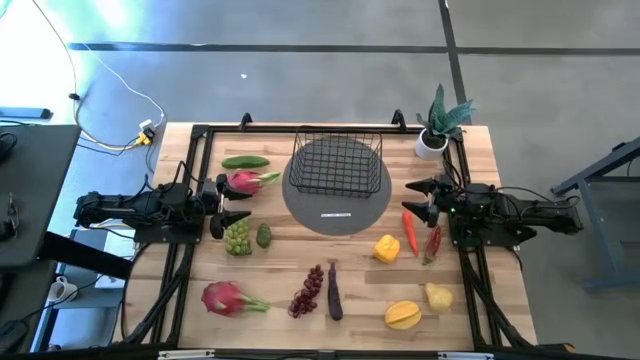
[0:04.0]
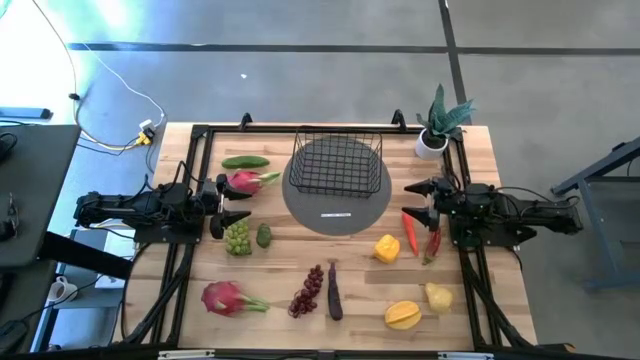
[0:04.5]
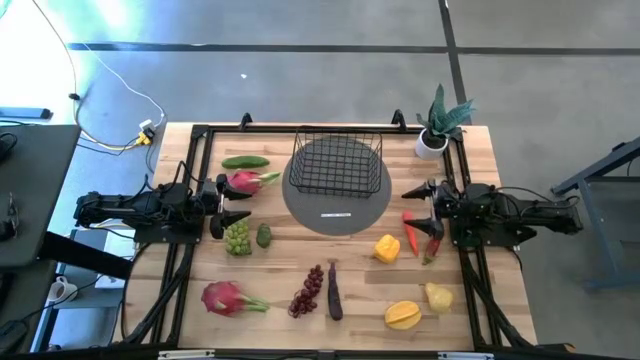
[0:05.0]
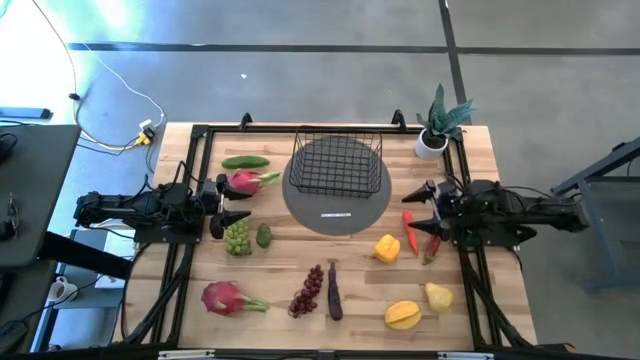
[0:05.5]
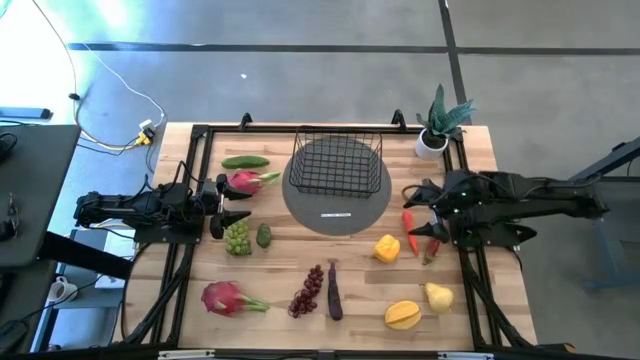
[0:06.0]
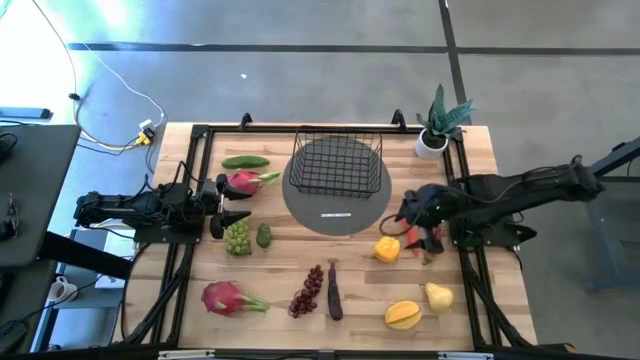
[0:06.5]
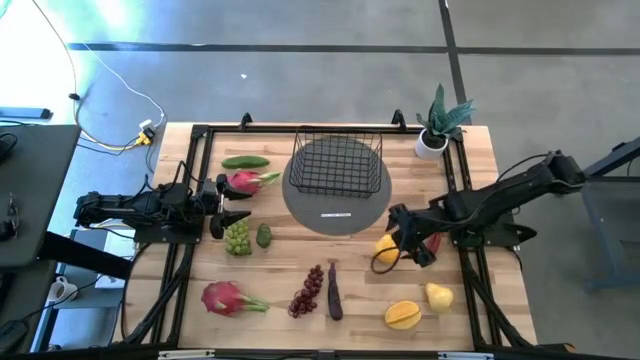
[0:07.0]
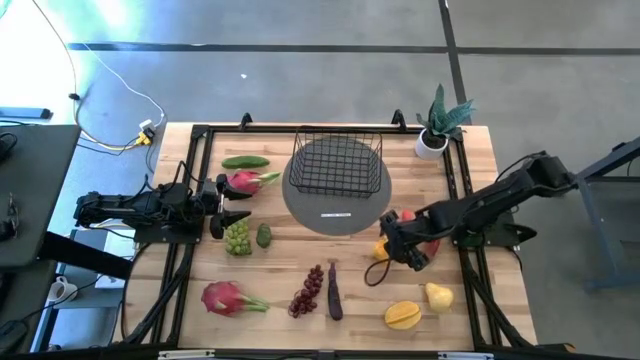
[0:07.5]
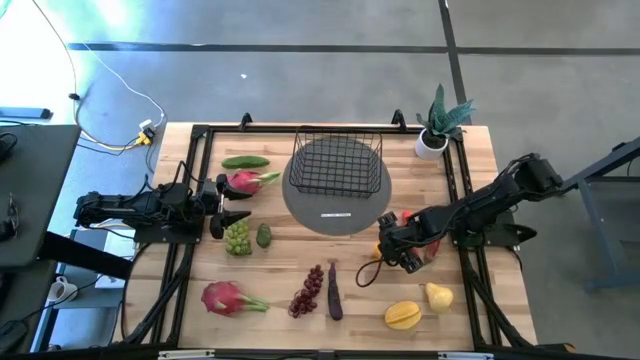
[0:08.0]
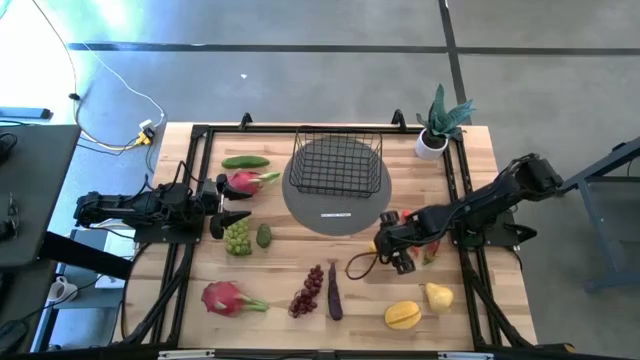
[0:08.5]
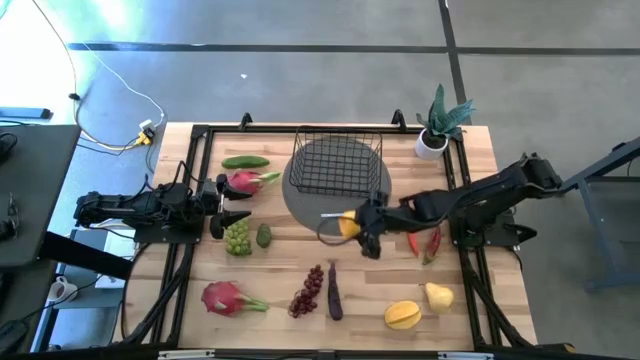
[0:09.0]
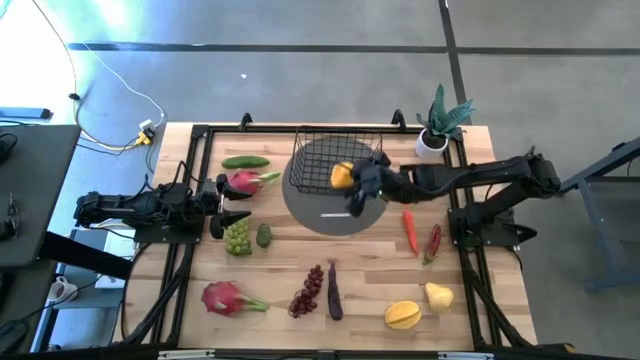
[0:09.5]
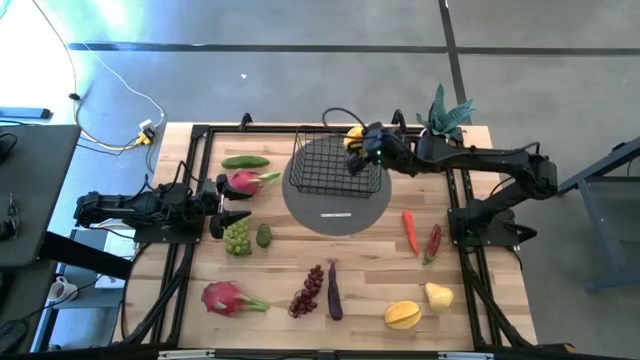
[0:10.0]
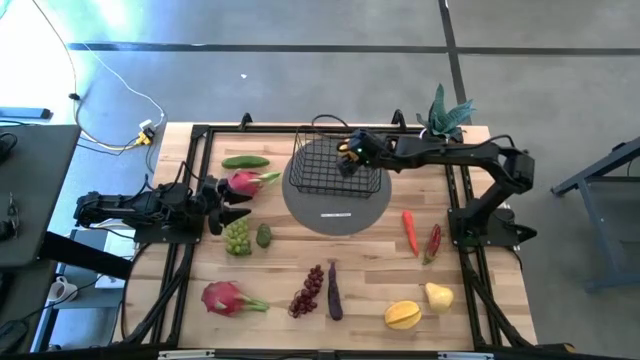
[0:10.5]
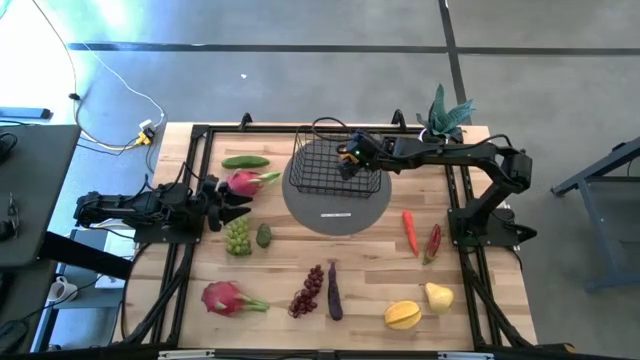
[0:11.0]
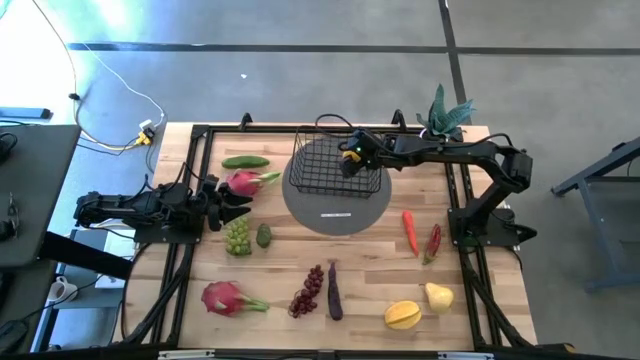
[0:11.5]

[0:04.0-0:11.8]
Task: Build produce basket
Put the bell pepper into the wire basket

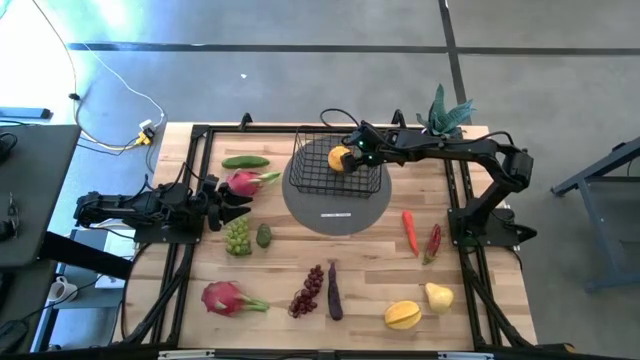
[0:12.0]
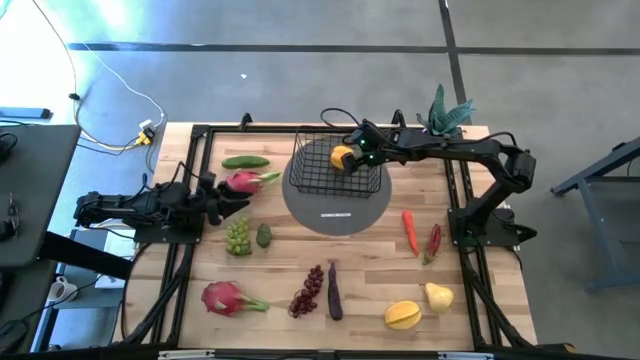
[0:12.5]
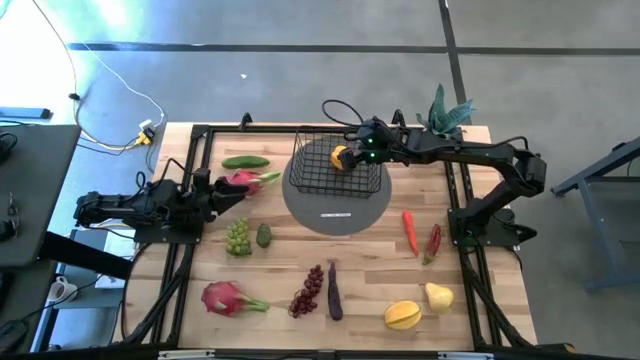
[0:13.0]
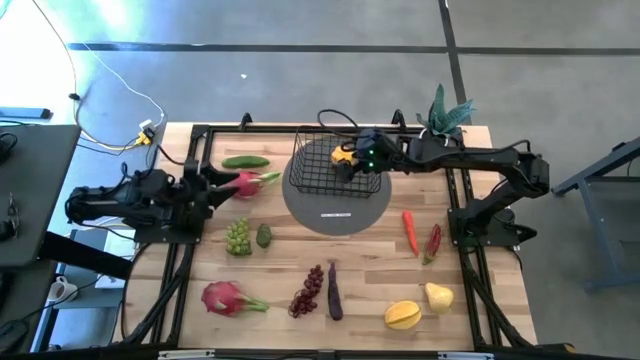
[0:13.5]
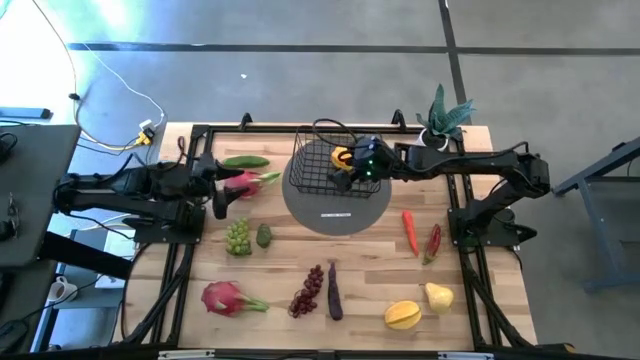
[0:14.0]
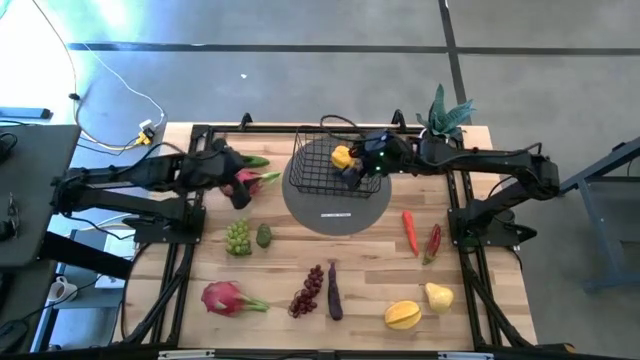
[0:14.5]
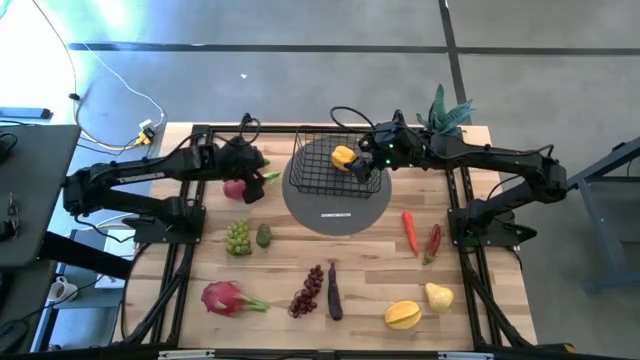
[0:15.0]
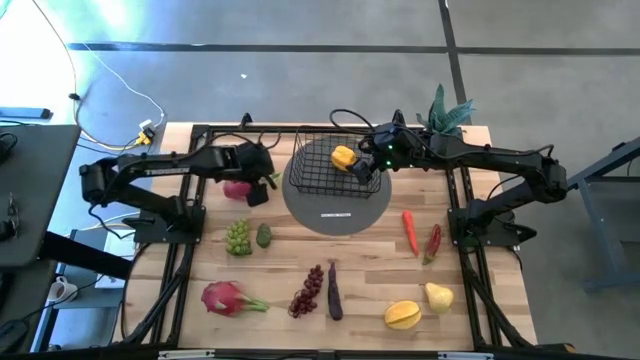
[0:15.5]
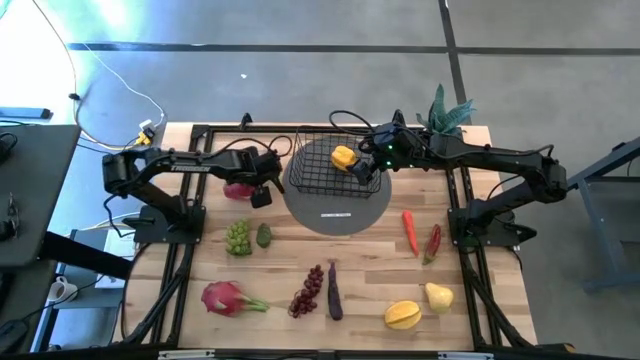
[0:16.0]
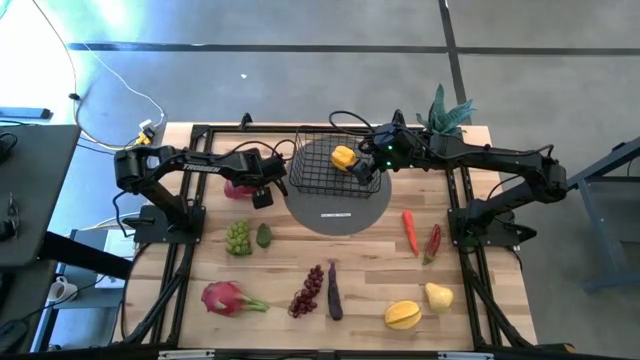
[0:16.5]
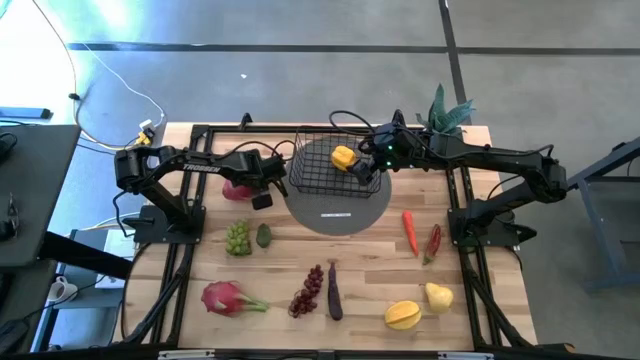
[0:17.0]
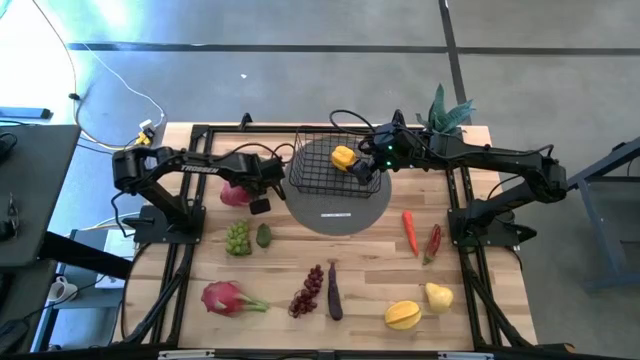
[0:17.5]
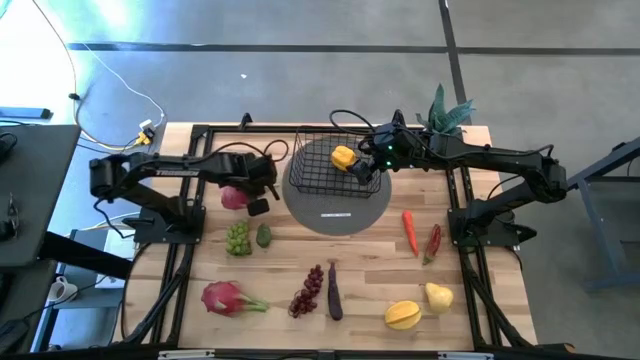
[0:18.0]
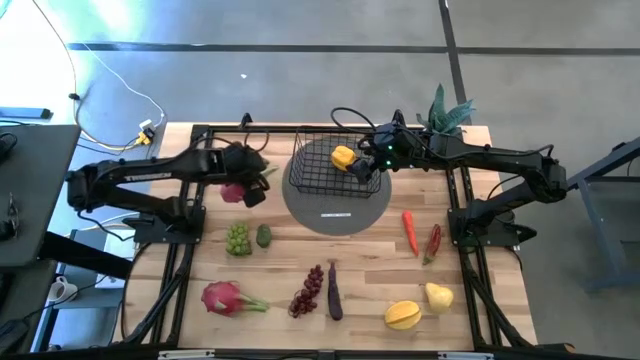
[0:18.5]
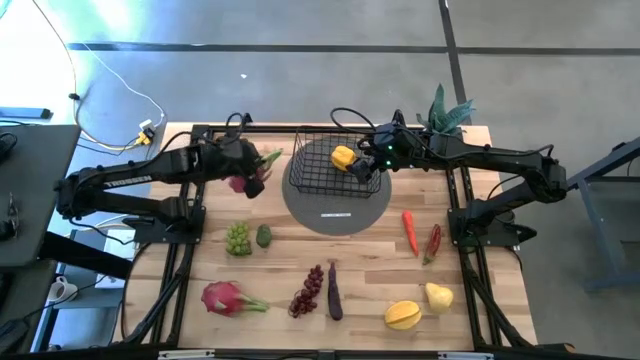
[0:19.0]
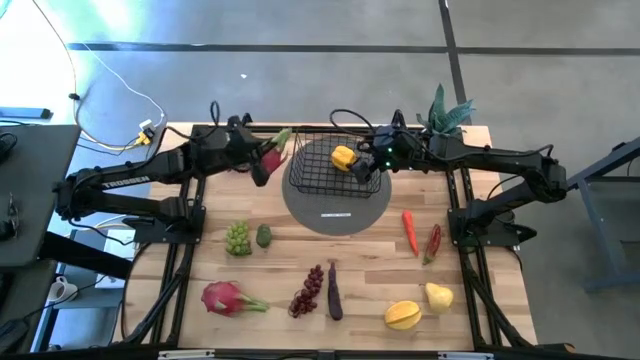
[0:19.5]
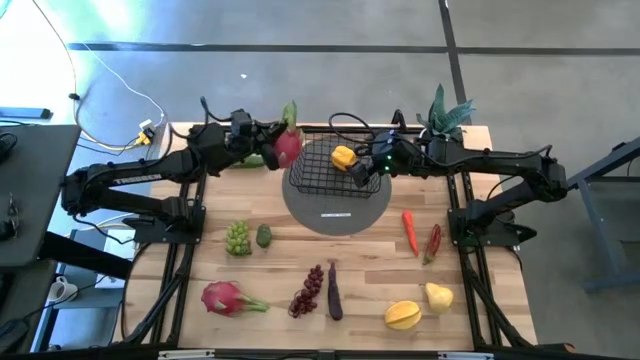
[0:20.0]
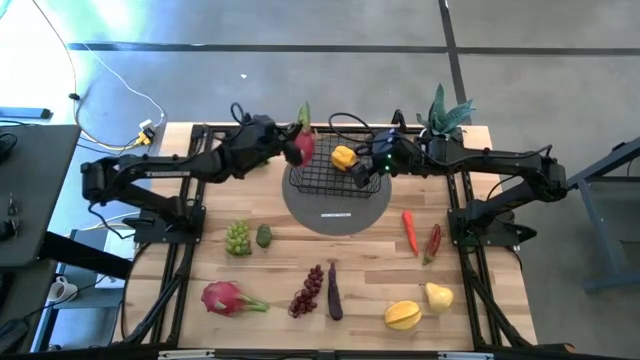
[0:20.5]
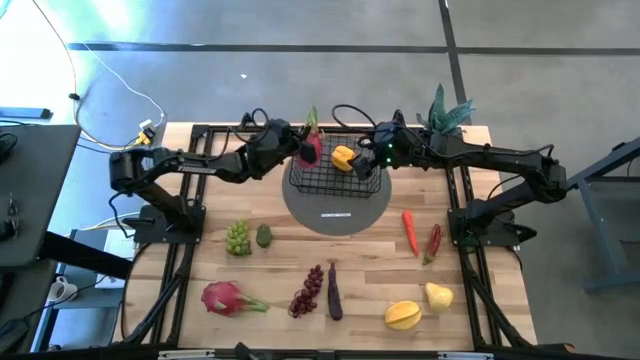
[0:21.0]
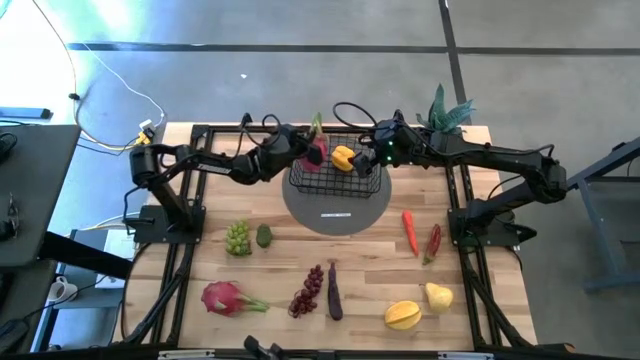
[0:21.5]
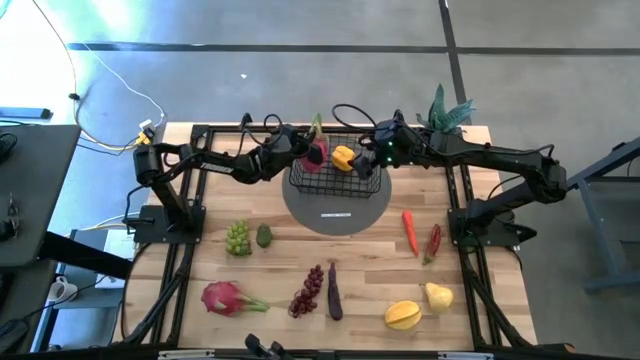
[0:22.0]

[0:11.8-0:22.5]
Put the top dragon fruit into the wire basket

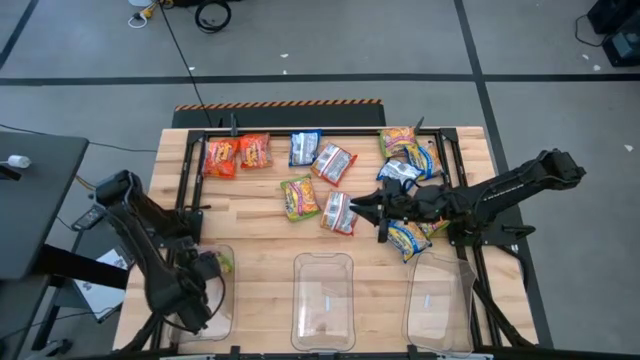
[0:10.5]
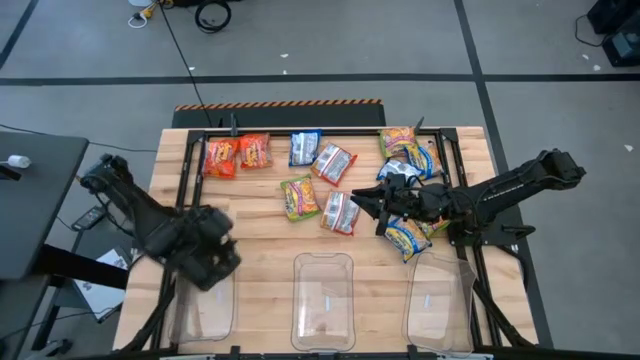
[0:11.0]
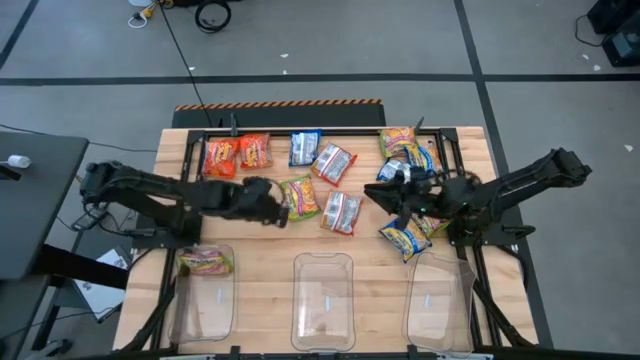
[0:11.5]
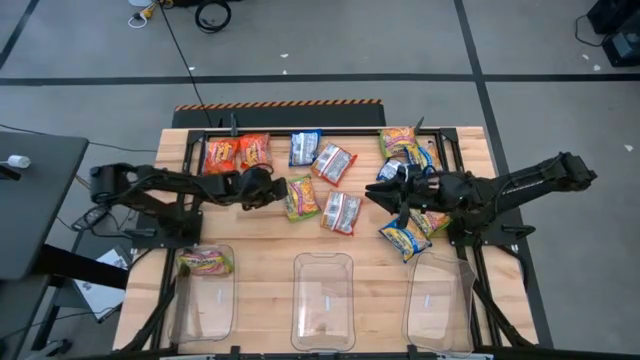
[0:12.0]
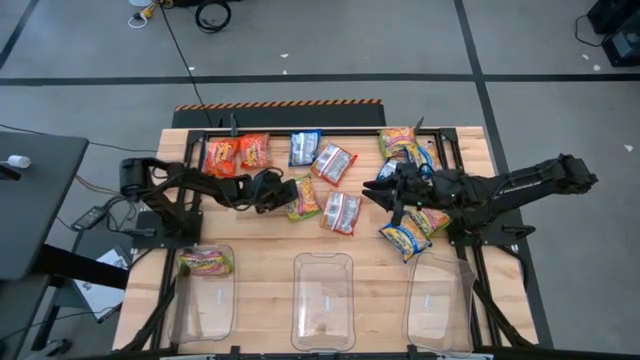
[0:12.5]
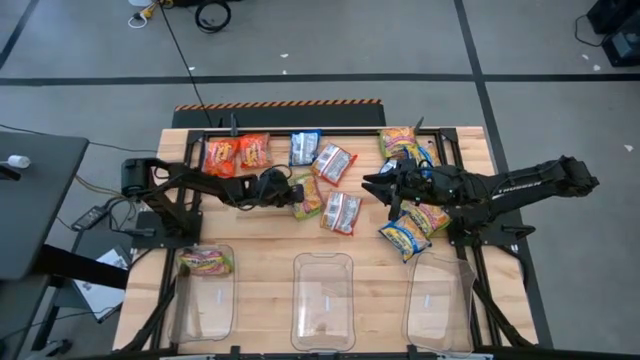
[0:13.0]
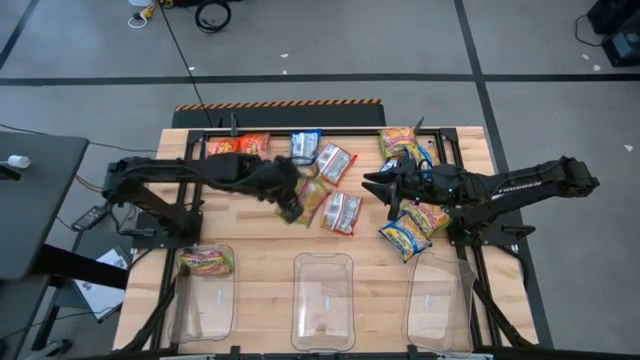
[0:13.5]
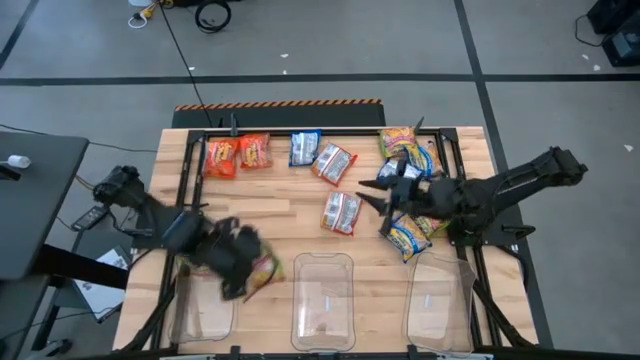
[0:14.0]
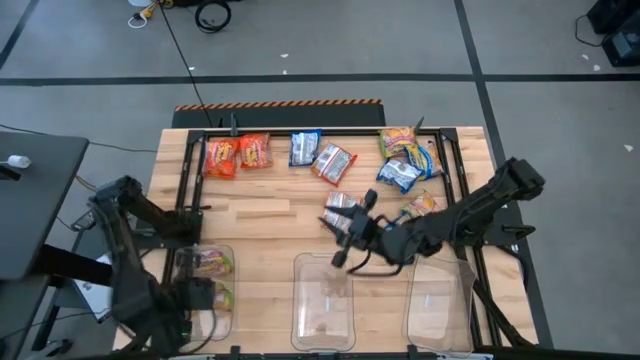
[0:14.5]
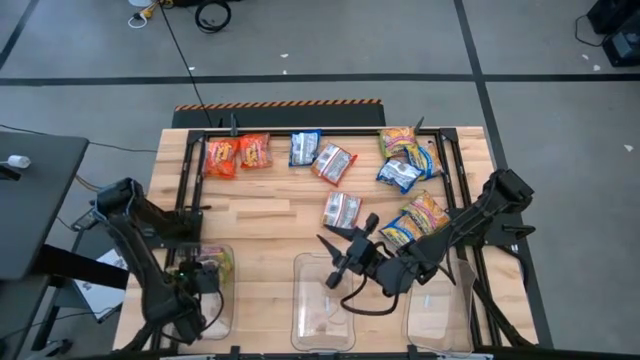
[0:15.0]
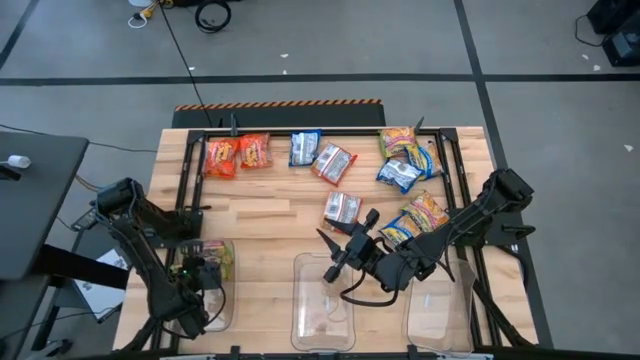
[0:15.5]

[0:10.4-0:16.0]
Task: Sort Maruchan noodles
Put the green noodle pack into the left transparent bin
